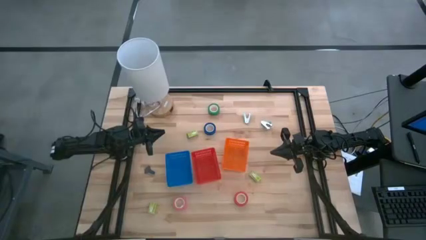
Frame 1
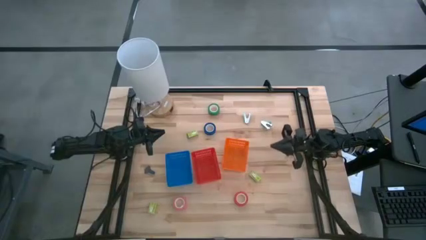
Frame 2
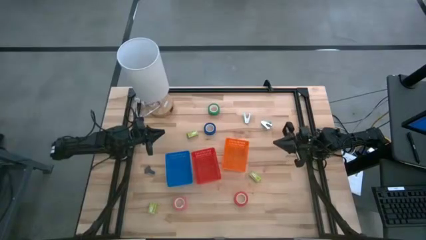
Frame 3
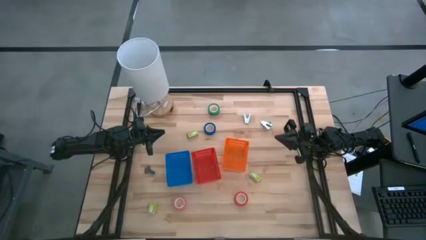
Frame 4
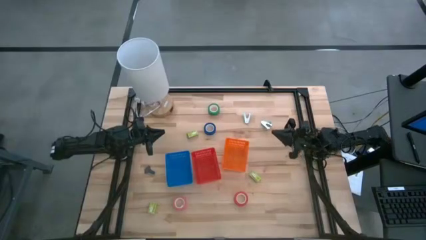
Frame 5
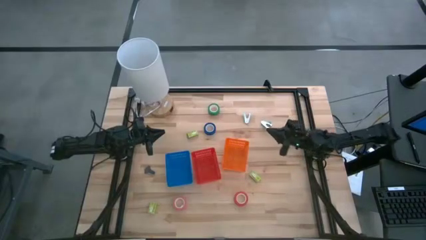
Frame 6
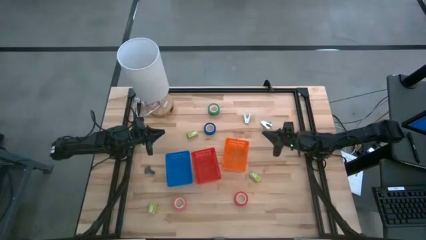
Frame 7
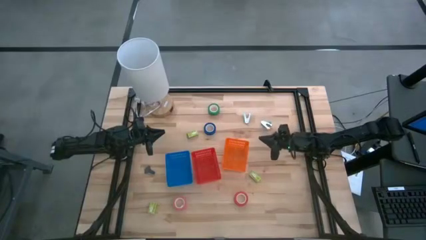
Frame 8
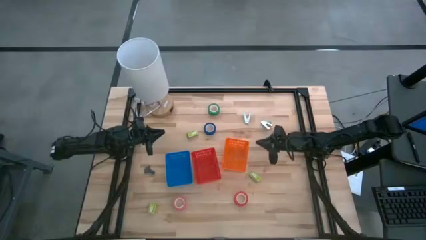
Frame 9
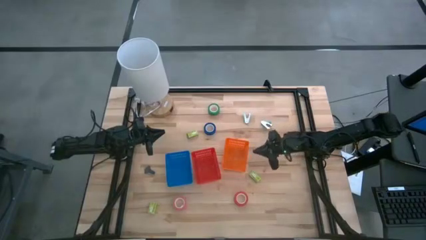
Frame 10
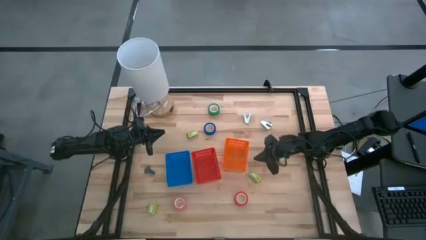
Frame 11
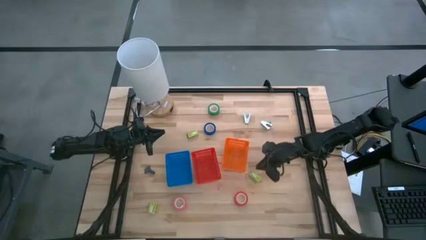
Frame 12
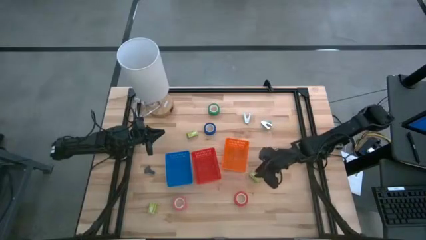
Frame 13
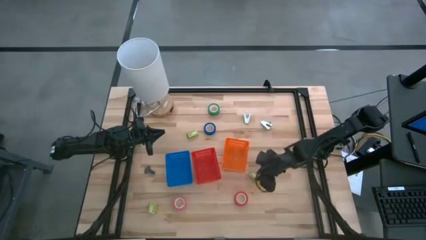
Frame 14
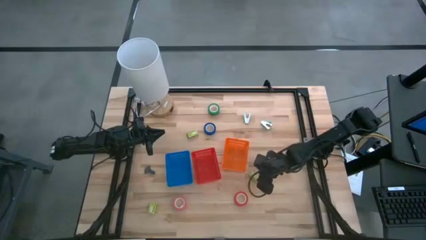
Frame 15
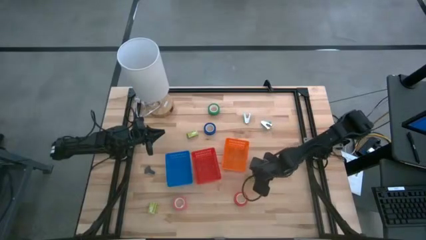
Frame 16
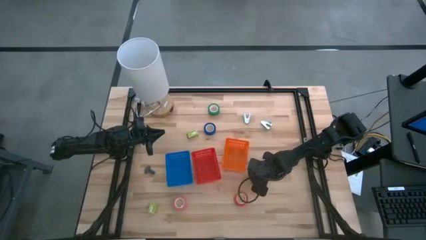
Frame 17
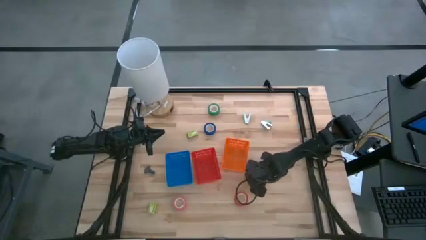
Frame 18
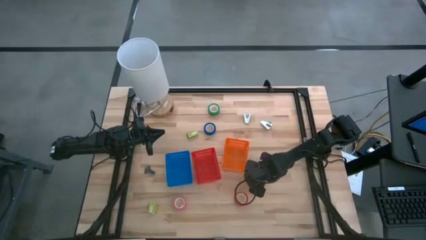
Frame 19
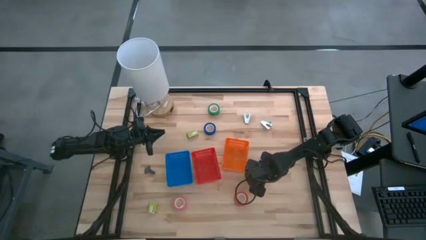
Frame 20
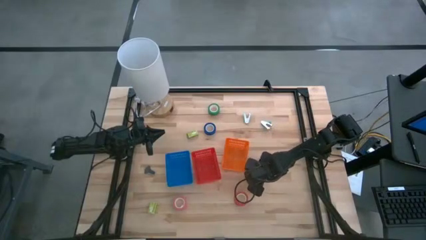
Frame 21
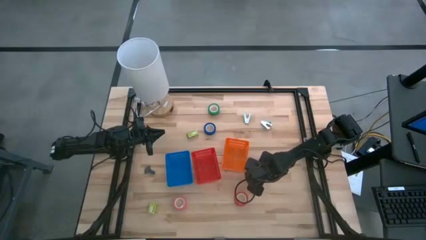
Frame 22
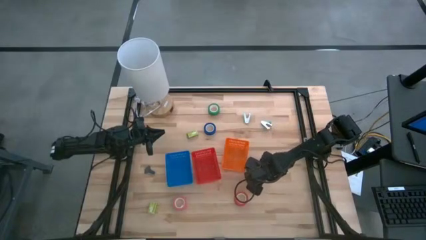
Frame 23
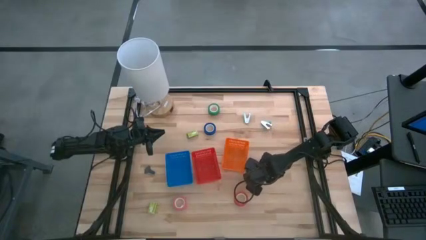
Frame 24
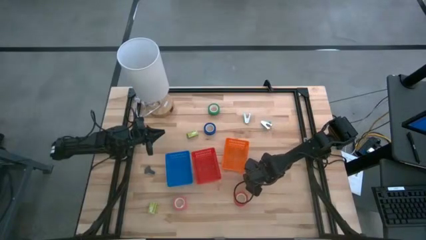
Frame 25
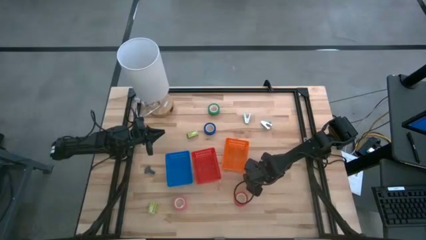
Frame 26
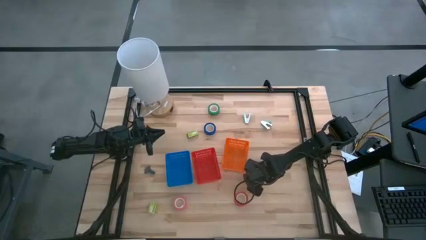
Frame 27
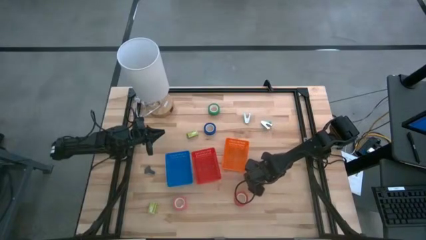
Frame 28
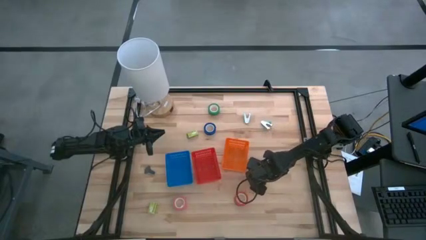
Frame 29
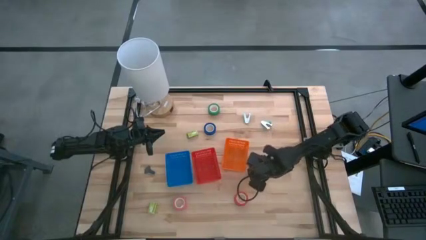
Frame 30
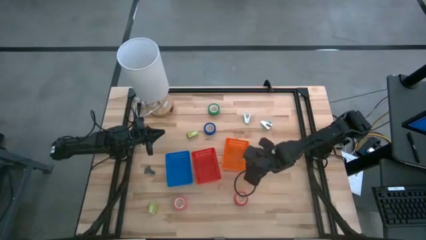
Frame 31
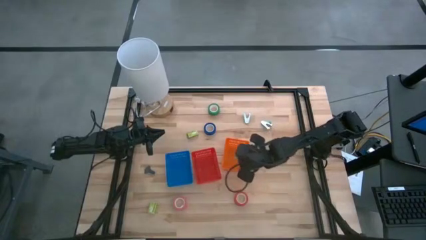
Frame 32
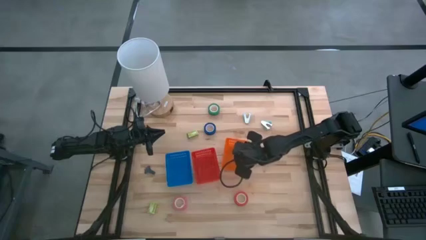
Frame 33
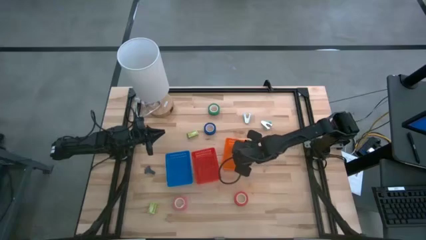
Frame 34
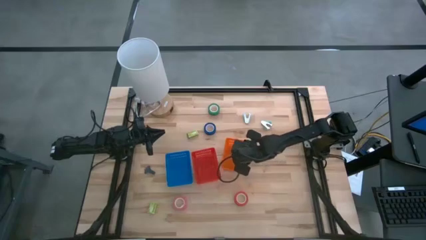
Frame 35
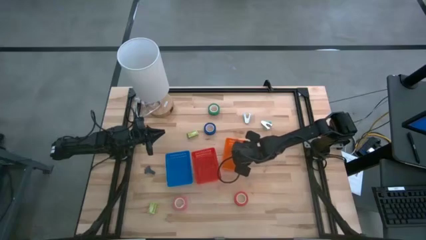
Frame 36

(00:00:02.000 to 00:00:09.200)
Task: Pick and place Stapler, Stapler remover, tape
Put the middle green staple box into the orange bin

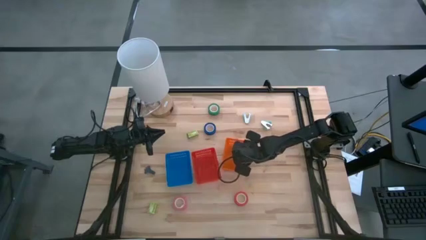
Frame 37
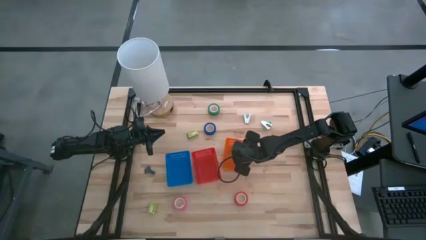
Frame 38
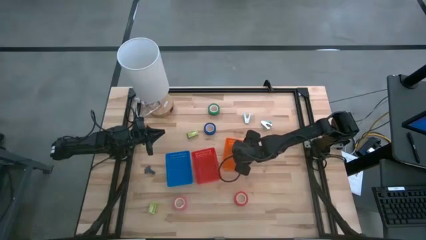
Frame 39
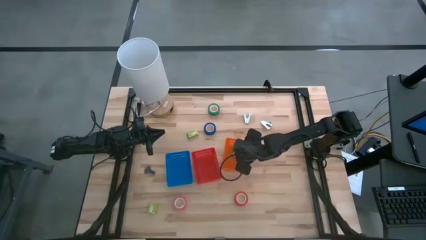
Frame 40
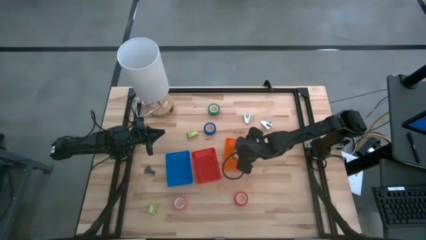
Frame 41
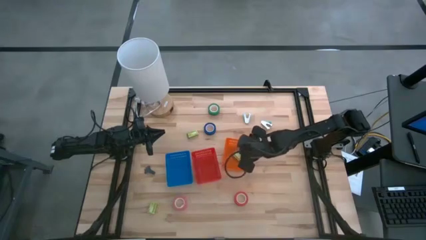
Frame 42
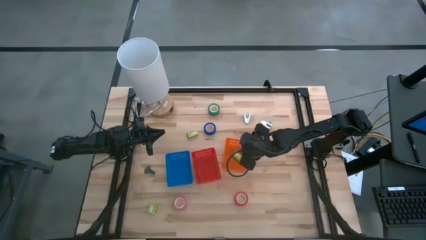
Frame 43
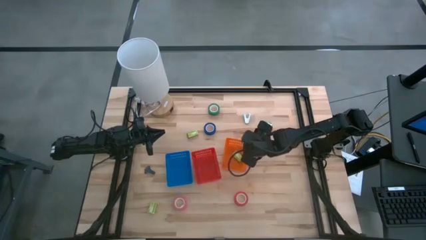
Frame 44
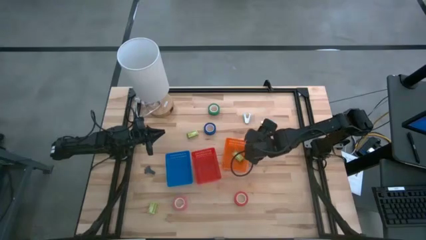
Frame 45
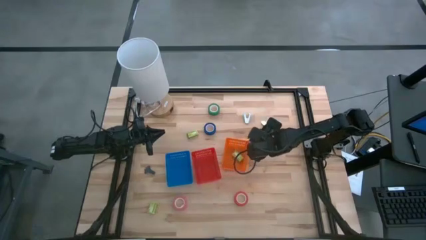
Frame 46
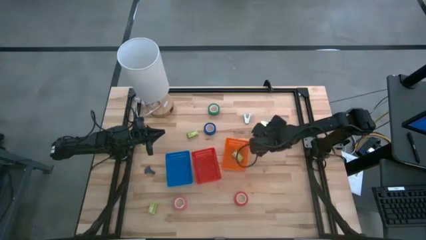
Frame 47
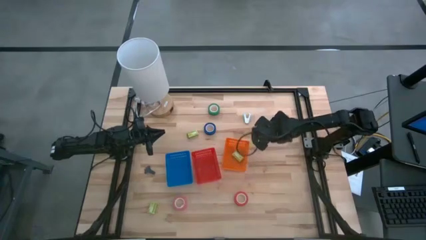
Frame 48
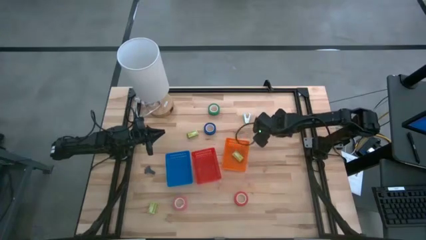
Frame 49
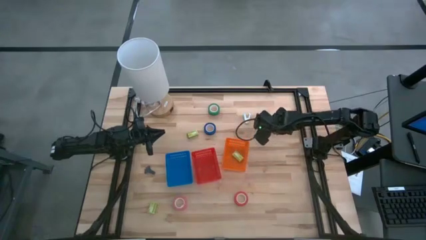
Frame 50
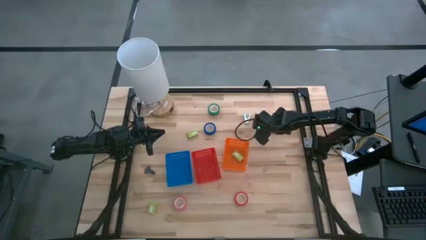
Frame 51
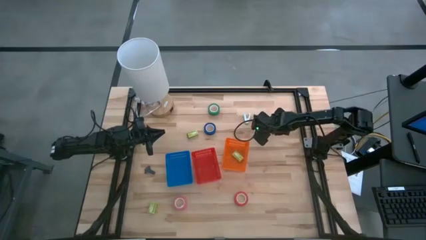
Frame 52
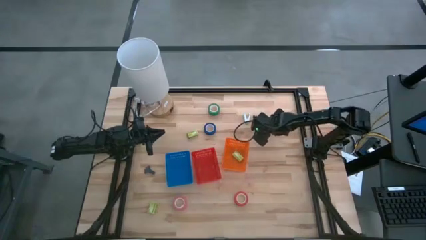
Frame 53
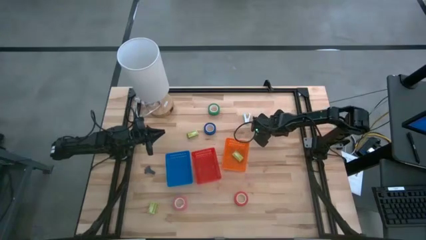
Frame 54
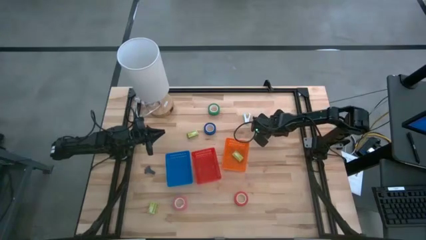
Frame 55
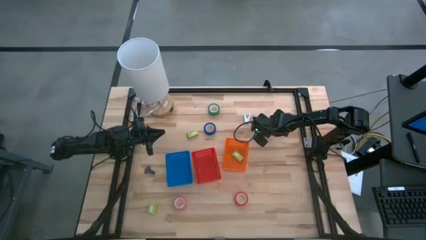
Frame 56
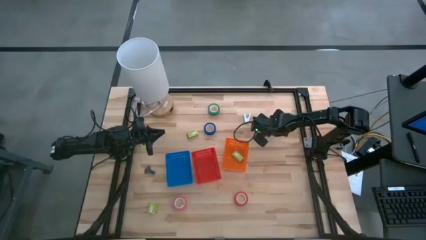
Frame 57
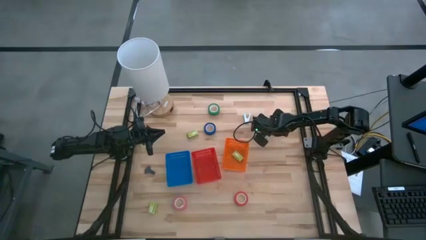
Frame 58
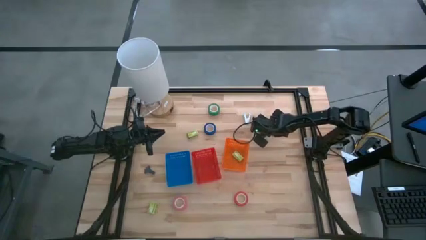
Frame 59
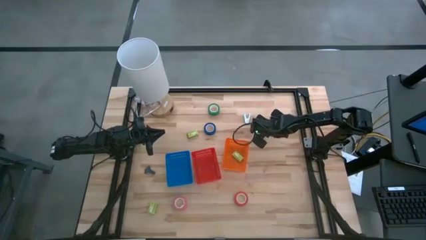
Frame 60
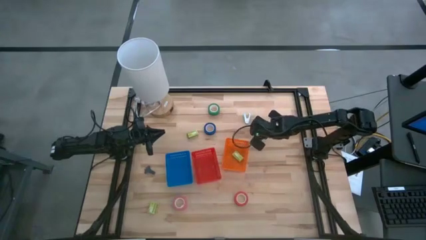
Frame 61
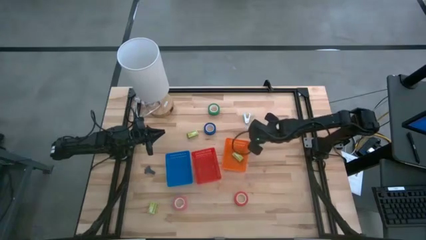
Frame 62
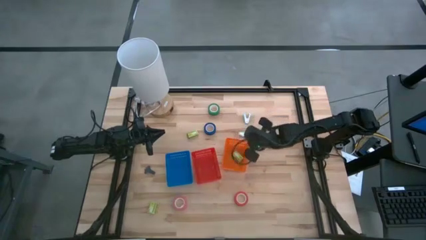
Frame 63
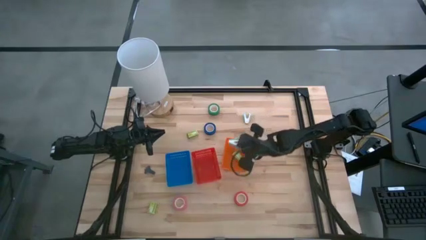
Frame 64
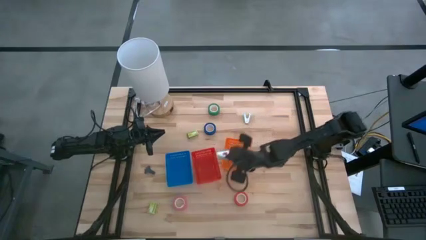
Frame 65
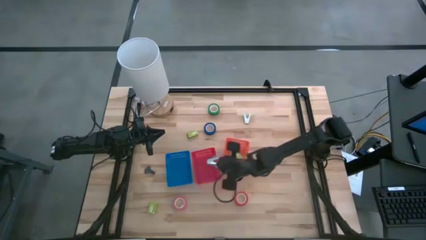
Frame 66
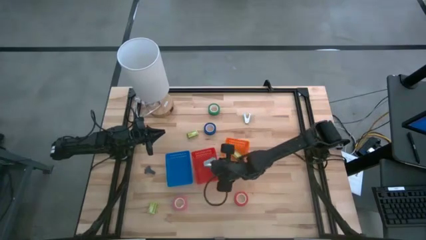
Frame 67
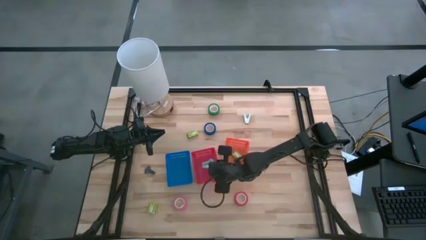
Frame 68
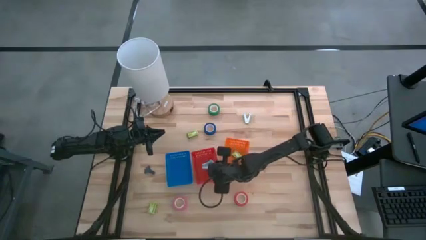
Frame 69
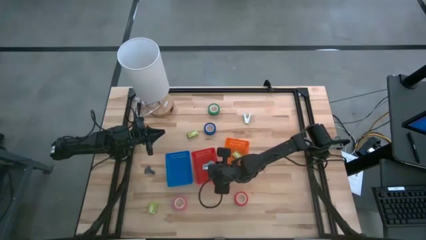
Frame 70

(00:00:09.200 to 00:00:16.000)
Put the right blue staple remover into the red bin

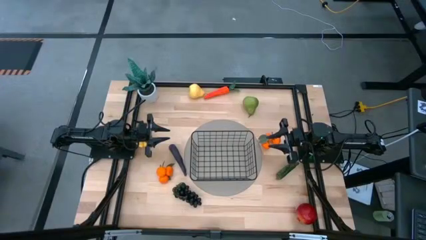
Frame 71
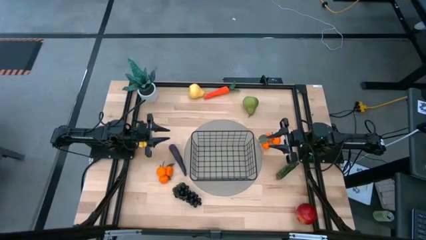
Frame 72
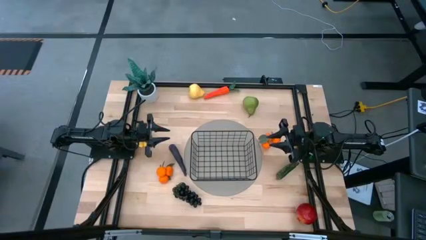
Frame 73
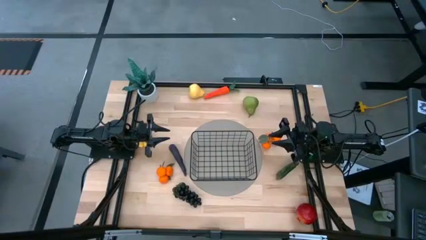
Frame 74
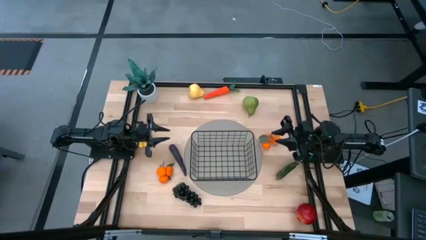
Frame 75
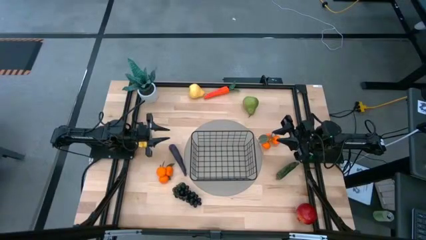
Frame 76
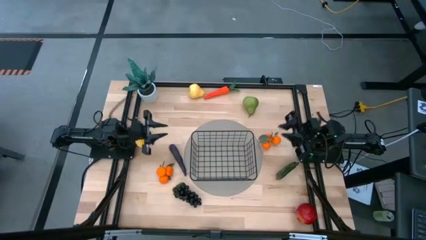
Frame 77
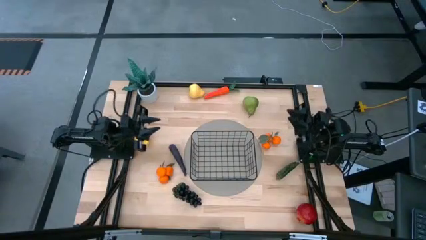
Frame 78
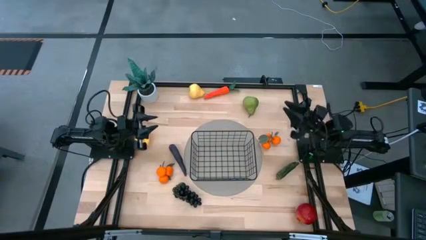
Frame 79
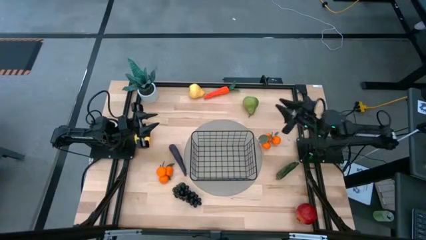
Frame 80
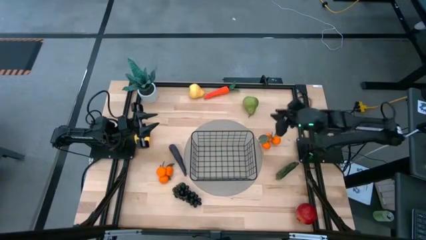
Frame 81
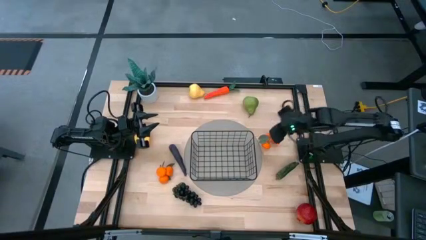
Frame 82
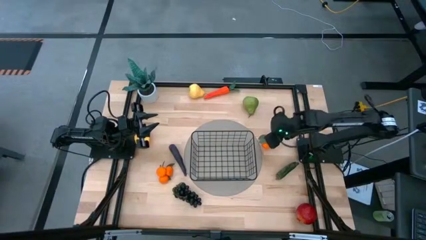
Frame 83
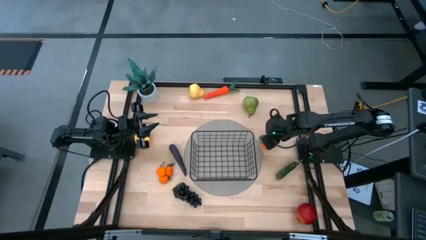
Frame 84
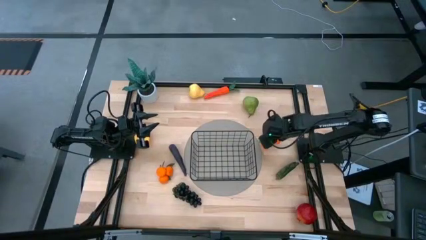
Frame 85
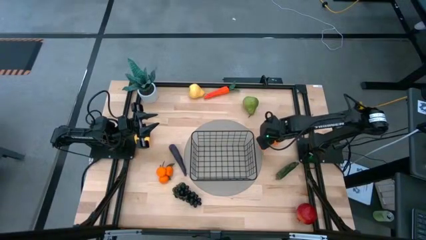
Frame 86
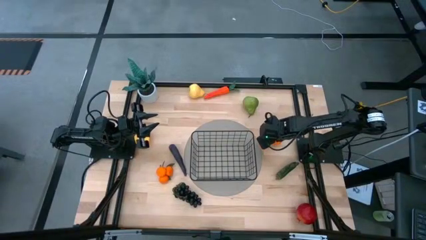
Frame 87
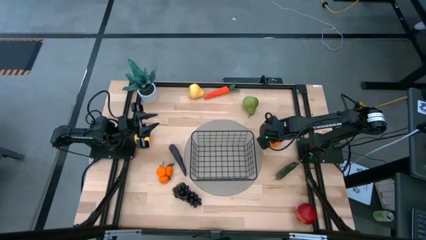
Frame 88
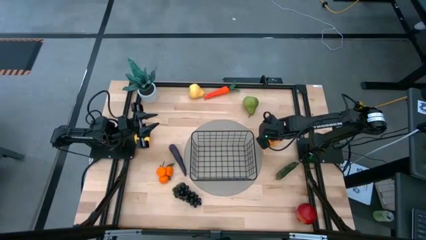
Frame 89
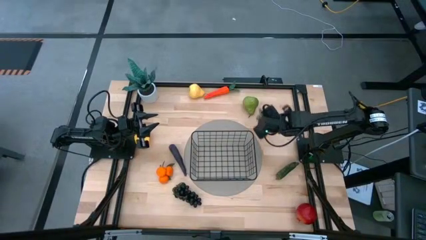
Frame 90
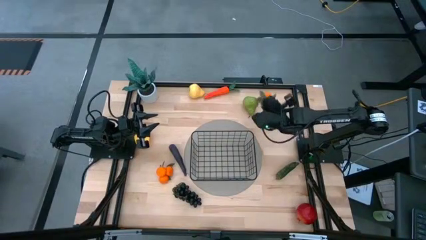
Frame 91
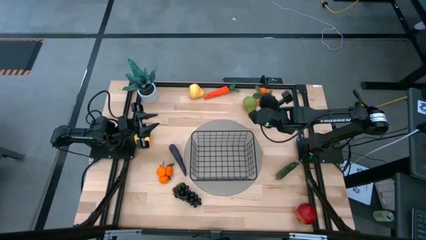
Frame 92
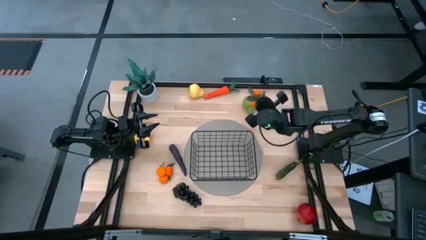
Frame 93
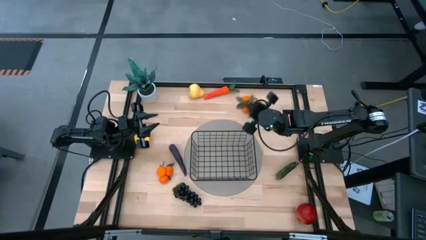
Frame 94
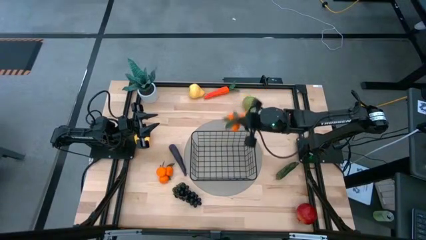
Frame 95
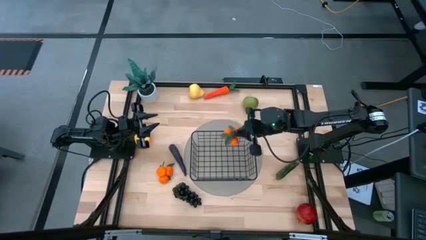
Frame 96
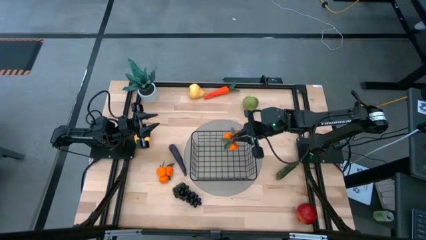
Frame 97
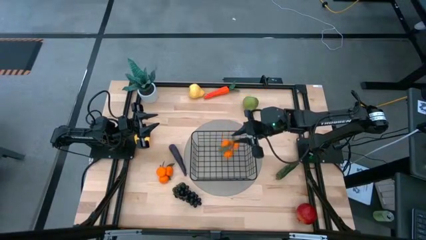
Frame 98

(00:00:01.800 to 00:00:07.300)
Task: Build produce basket
Put the right orange tangerines into the black wire basket
